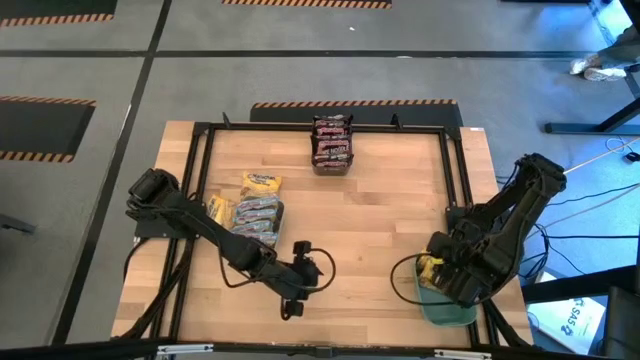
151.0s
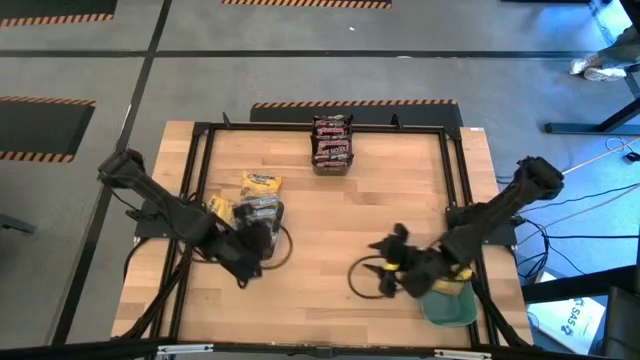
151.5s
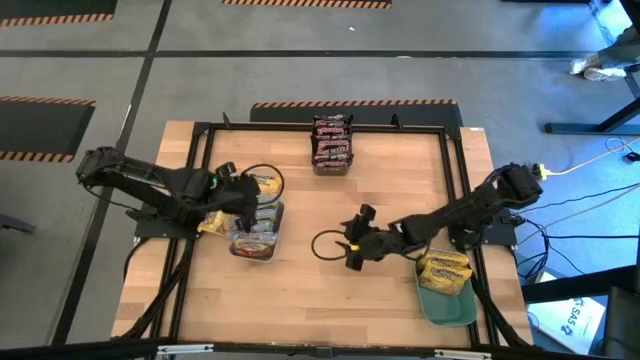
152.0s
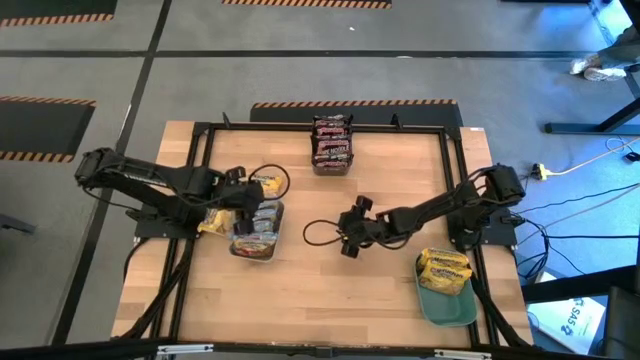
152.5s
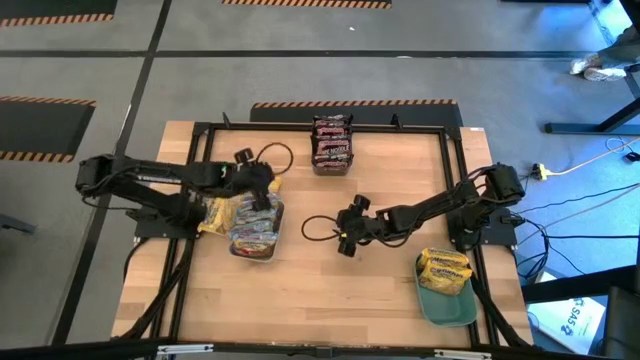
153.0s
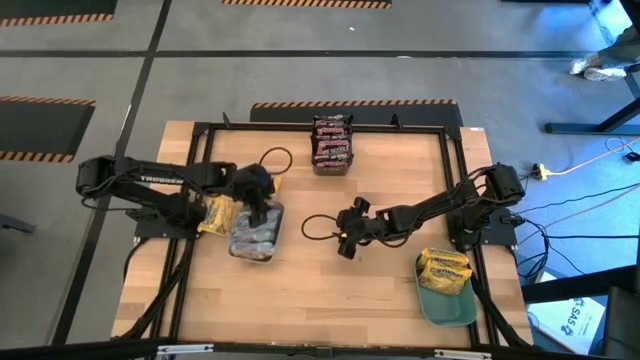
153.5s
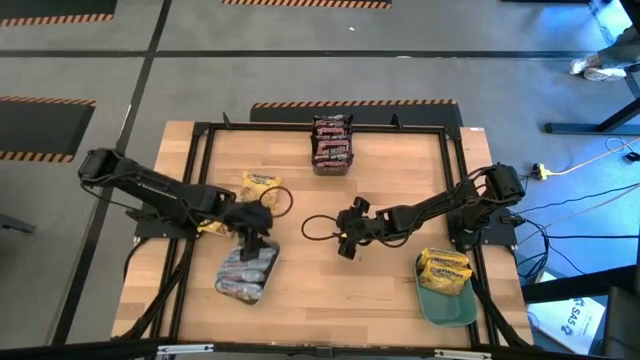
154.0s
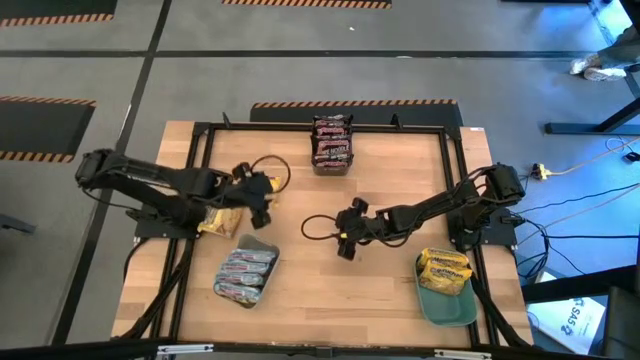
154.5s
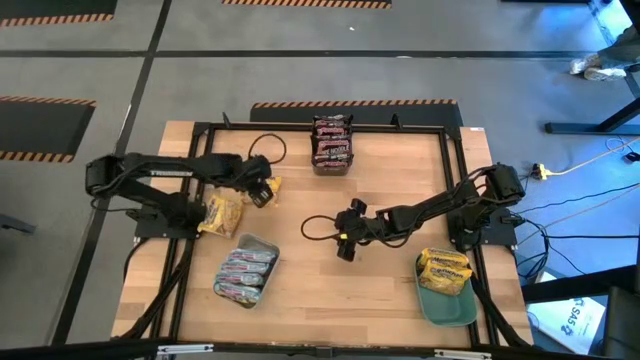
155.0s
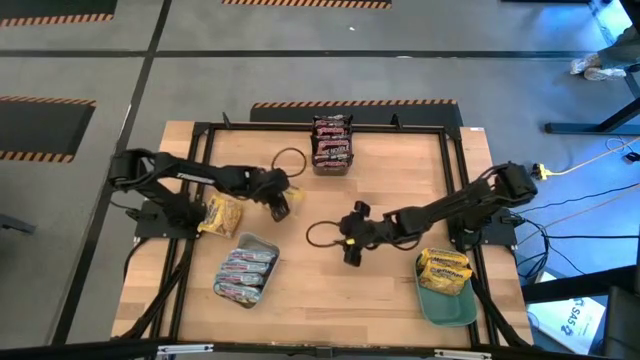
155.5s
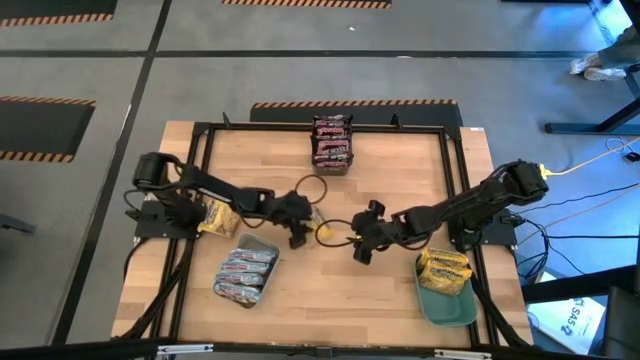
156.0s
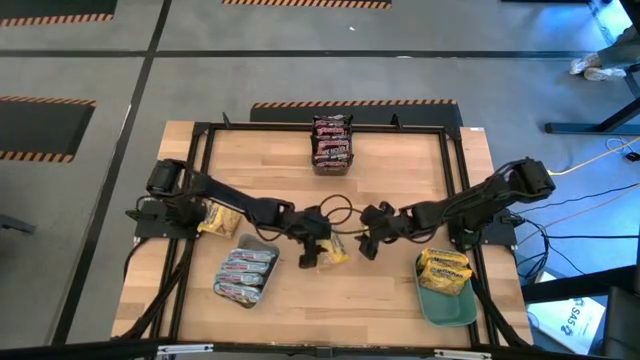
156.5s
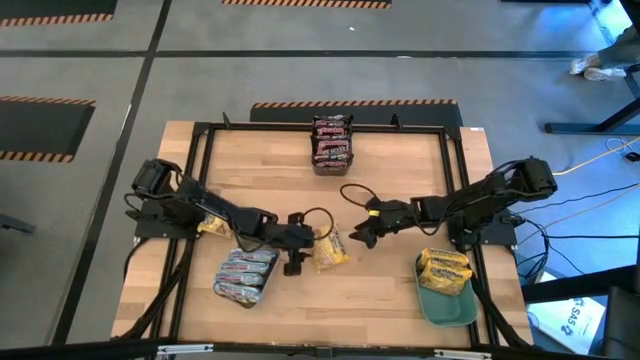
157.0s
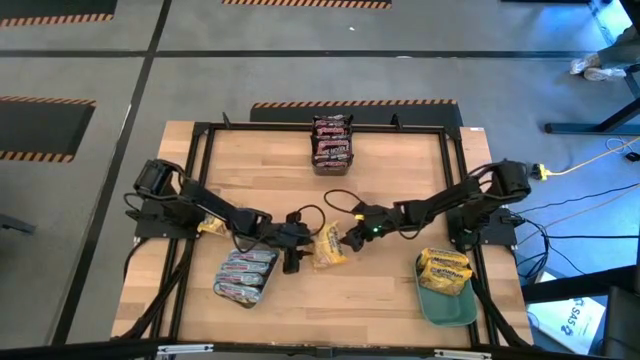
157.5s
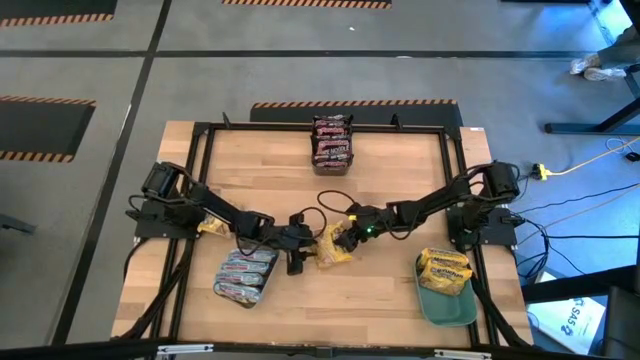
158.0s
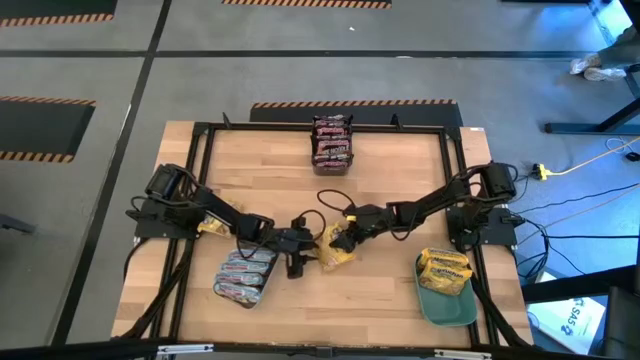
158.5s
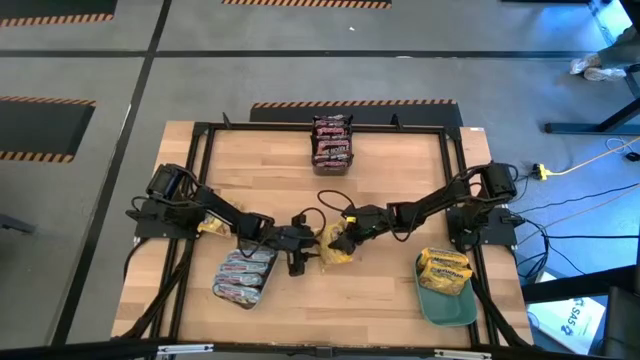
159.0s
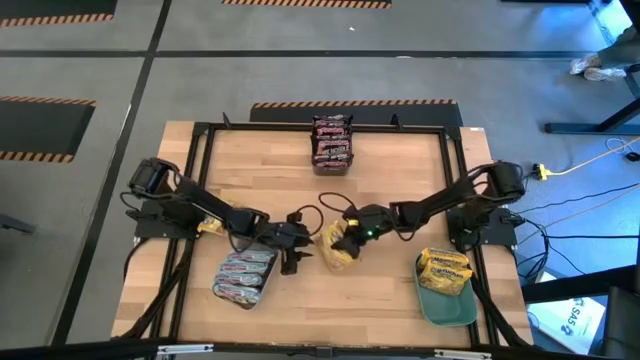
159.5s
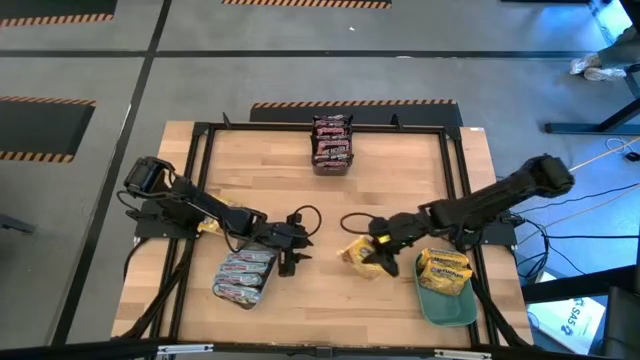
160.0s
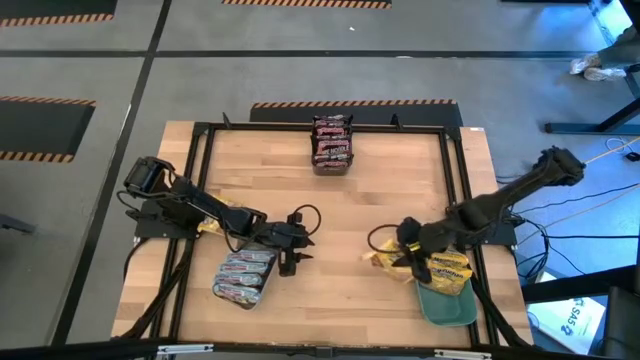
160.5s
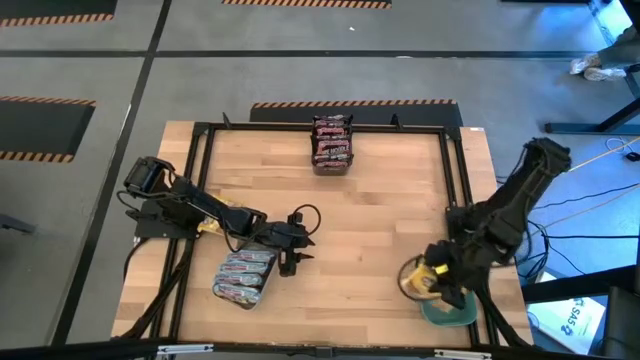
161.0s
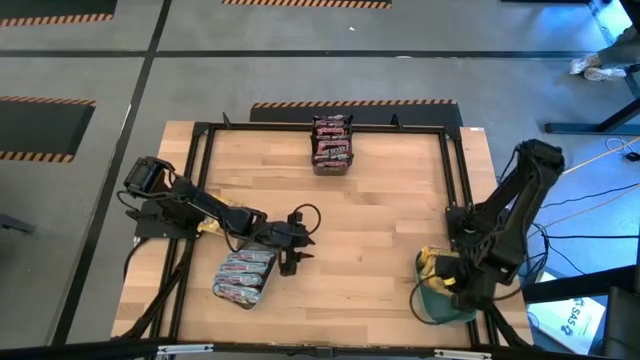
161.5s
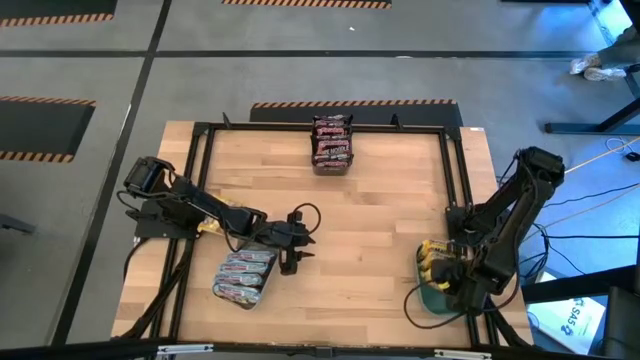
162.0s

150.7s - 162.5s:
Task: Sort Maruchan noodles
Put the top yellow noodle pack into the green bin

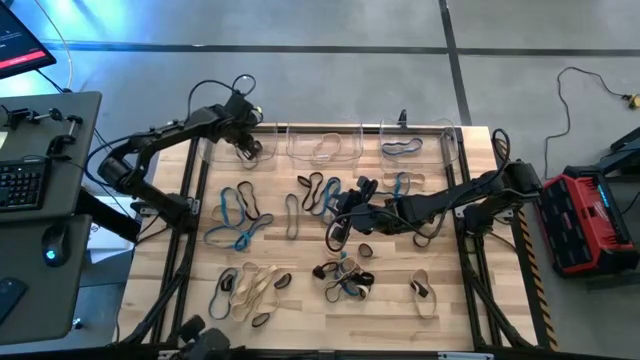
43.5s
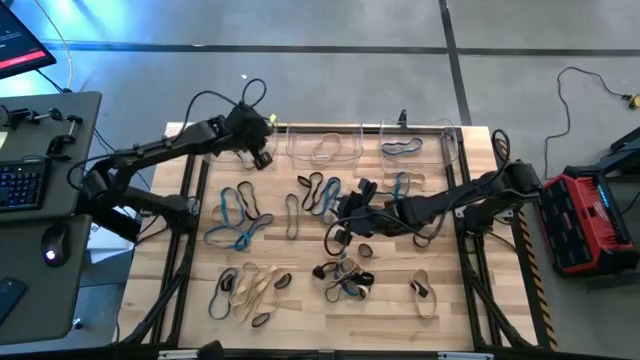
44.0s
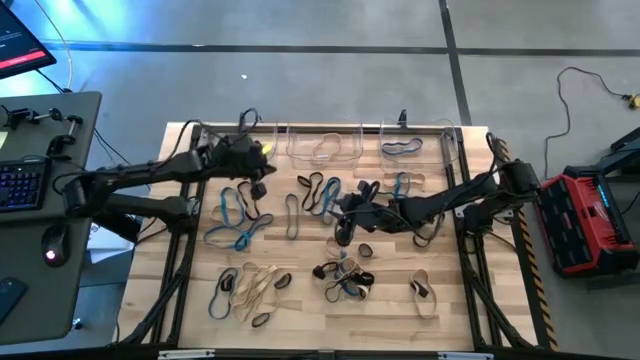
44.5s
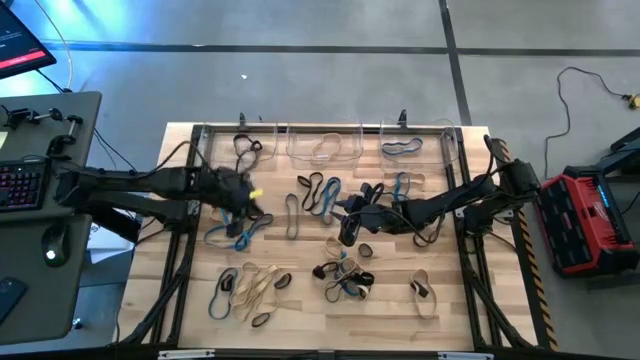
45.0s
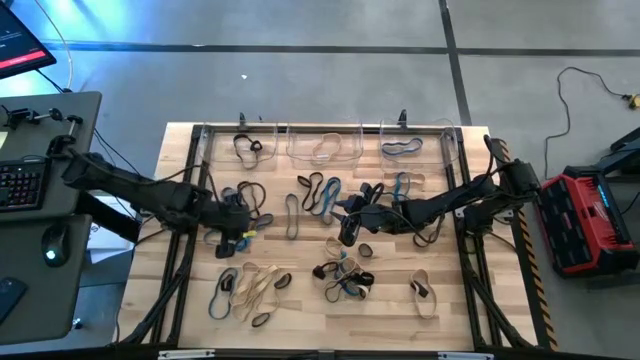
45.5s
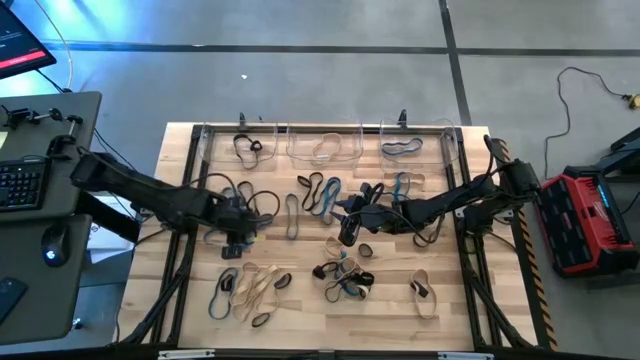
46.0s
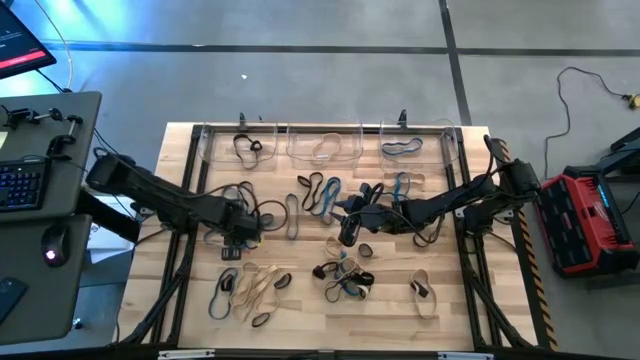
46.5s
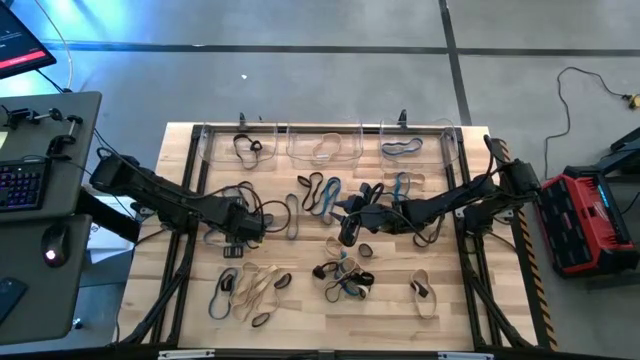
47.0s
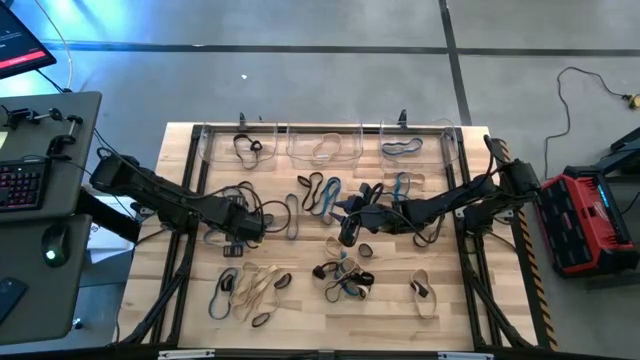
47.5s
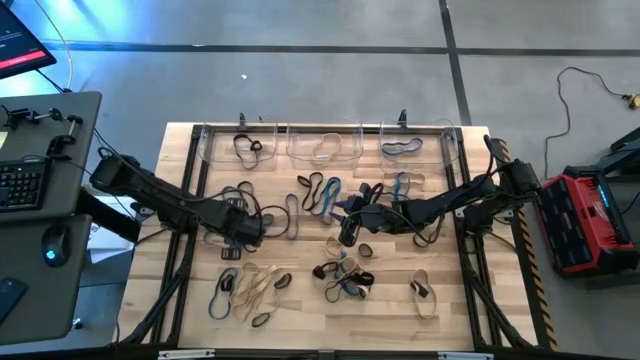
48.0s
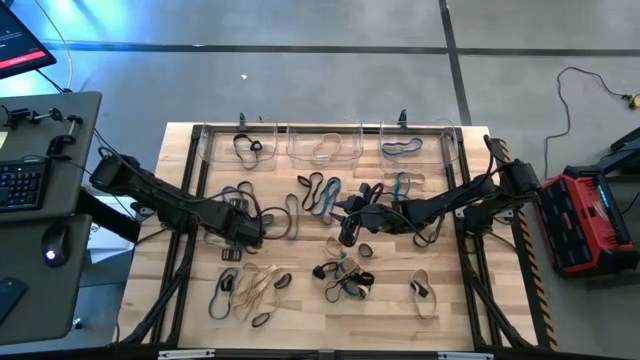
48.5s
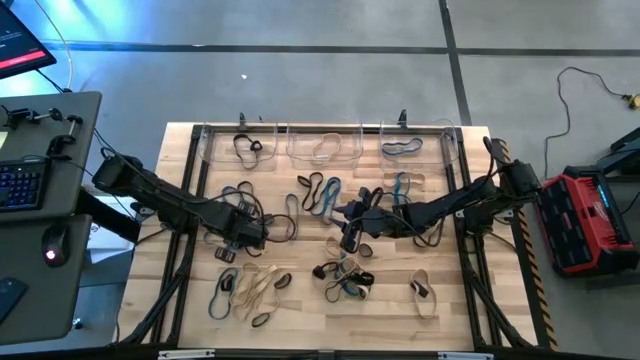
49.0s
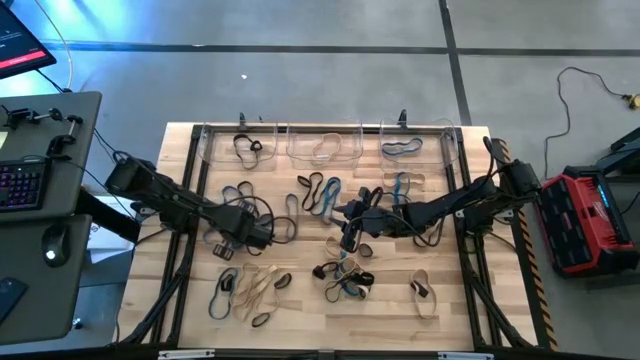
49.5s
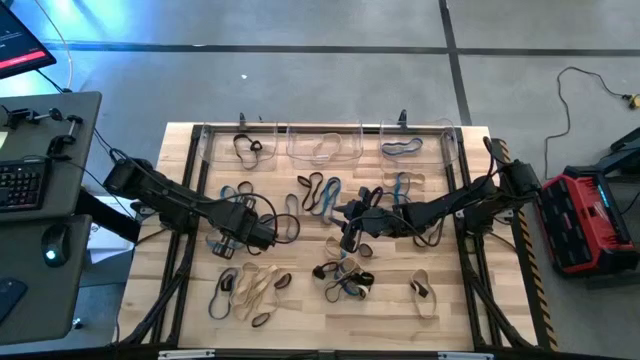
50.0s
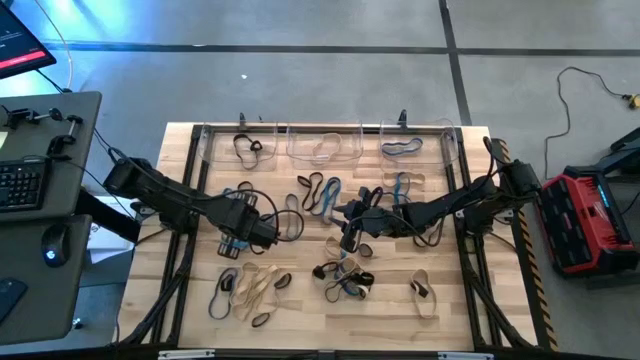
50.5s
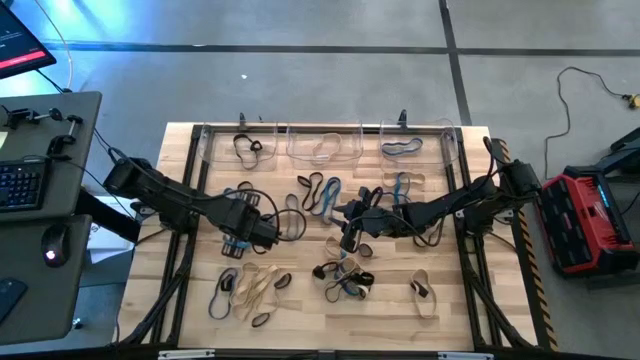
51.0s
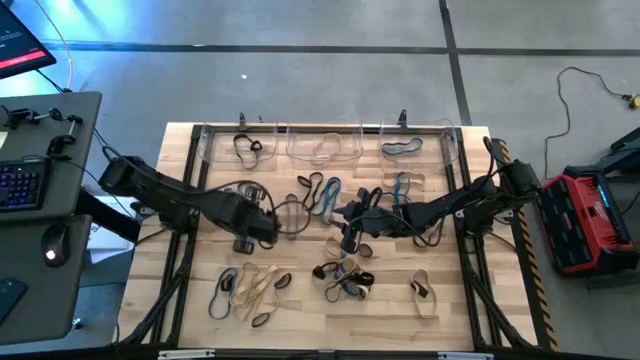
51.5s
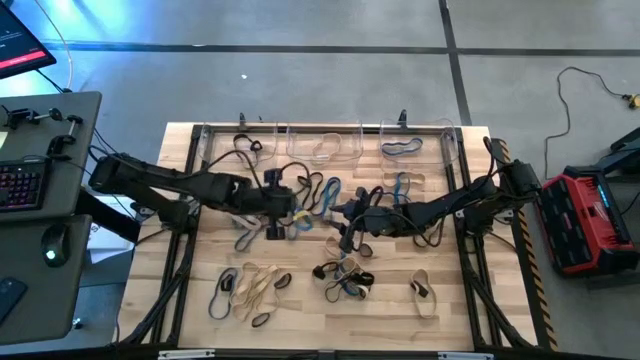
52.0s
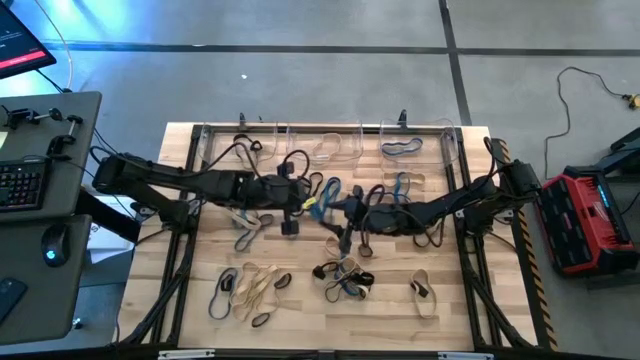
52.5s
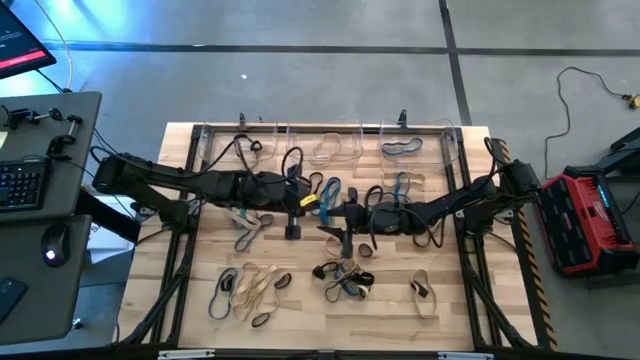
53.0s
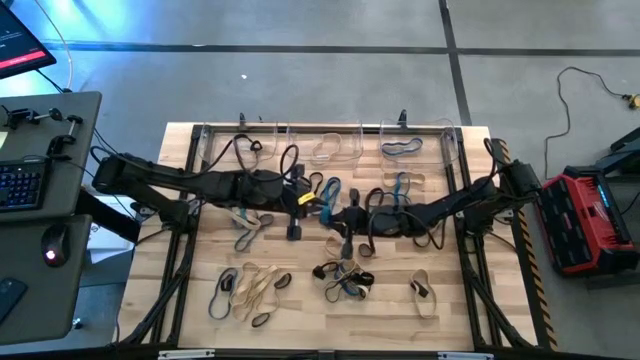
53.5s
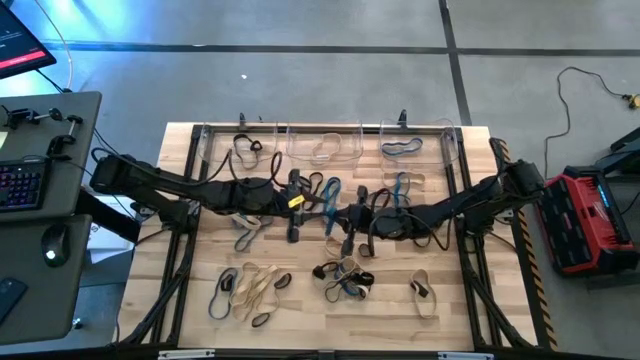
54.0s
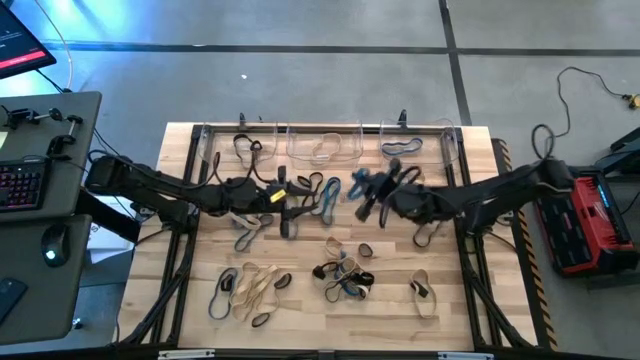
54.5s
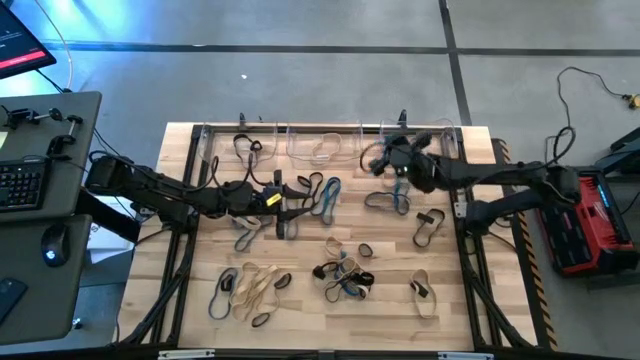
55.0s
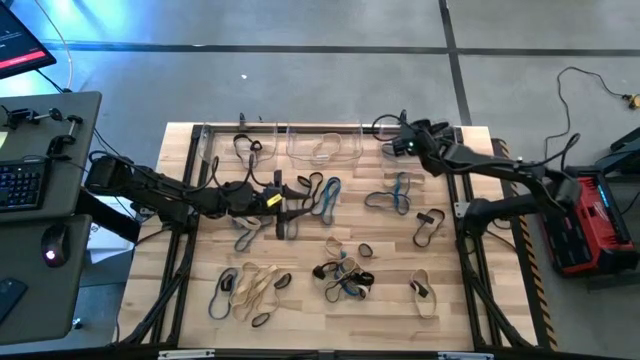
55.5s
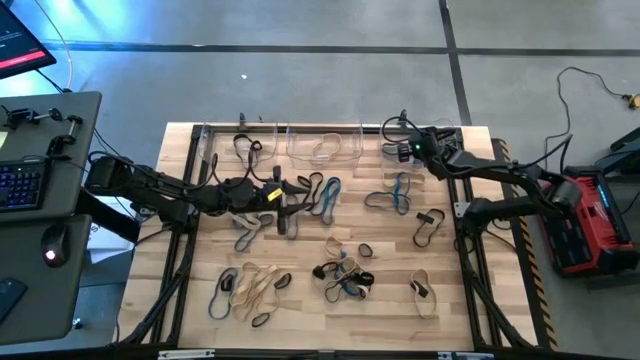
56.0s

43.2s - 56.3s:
Task: Sort rubber bands into baskets
Put the blue rubber band into the right transparent bin
